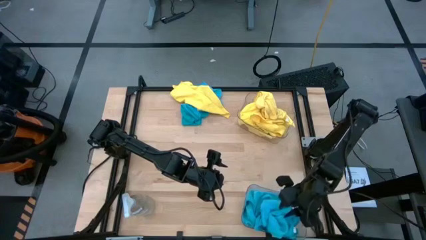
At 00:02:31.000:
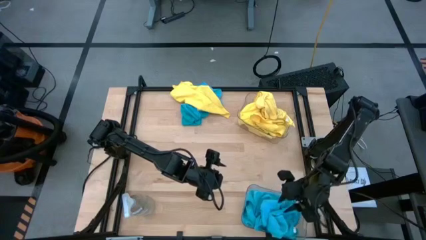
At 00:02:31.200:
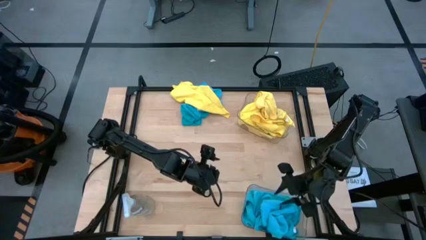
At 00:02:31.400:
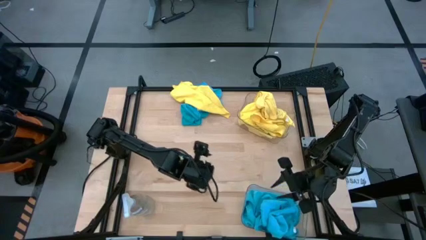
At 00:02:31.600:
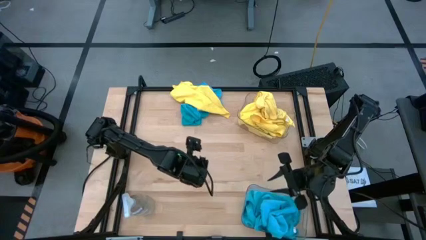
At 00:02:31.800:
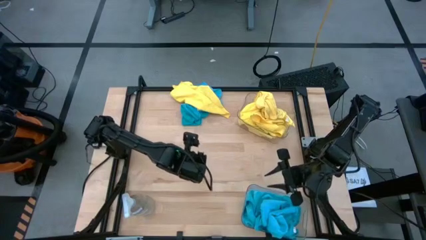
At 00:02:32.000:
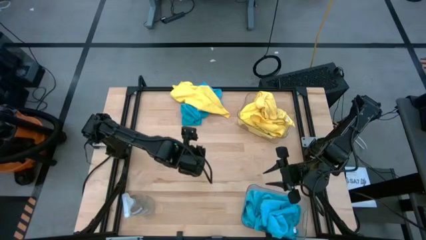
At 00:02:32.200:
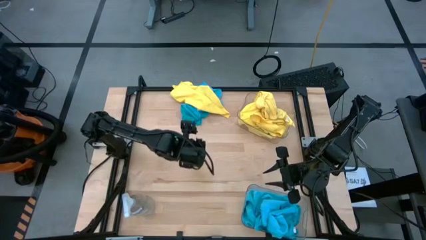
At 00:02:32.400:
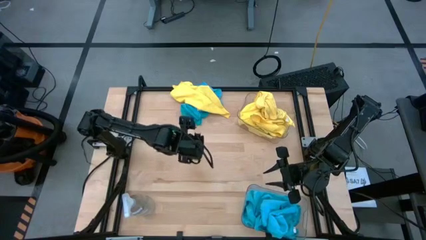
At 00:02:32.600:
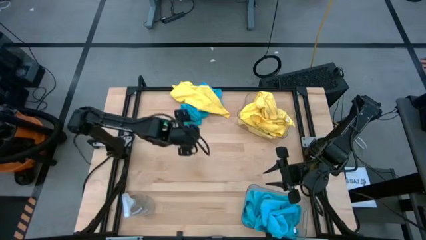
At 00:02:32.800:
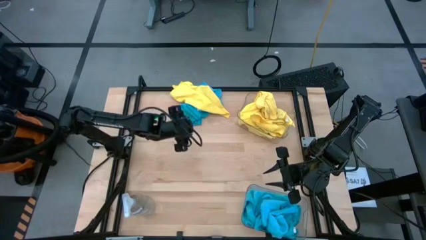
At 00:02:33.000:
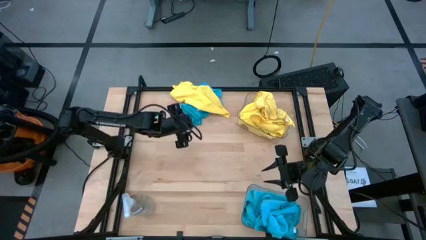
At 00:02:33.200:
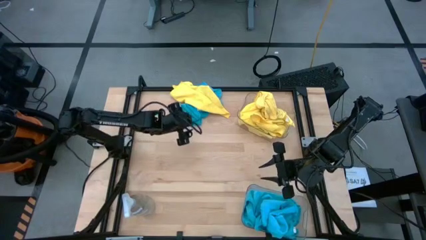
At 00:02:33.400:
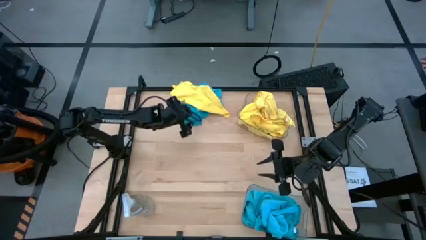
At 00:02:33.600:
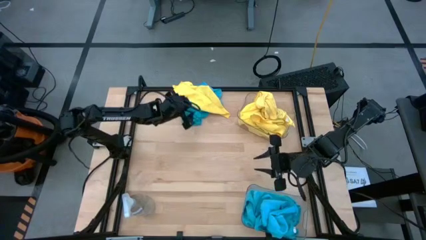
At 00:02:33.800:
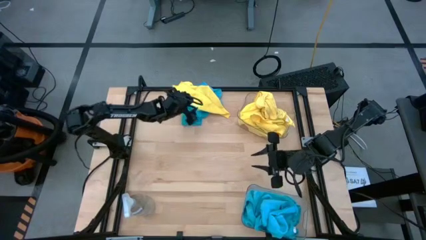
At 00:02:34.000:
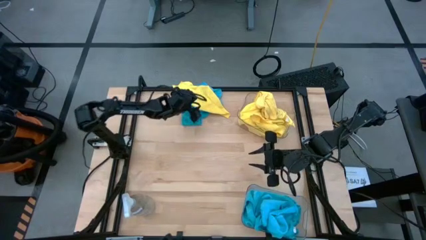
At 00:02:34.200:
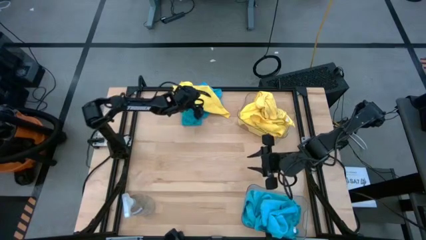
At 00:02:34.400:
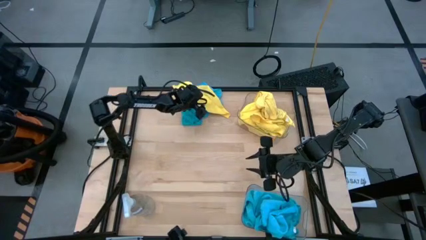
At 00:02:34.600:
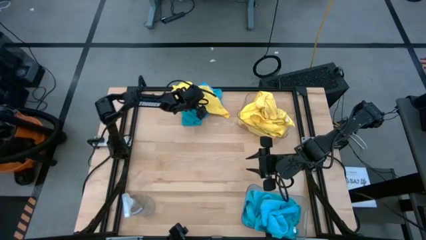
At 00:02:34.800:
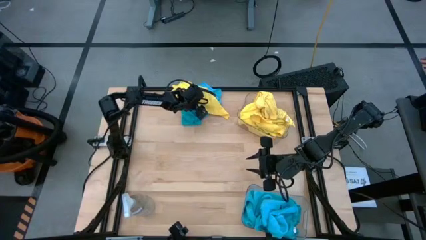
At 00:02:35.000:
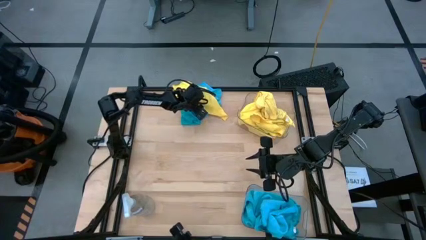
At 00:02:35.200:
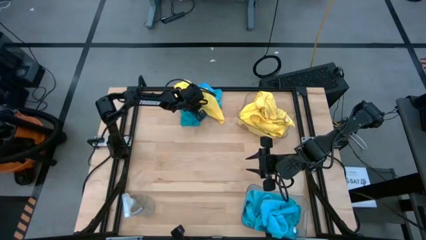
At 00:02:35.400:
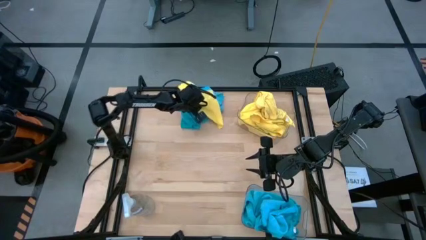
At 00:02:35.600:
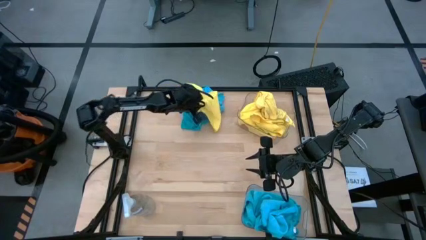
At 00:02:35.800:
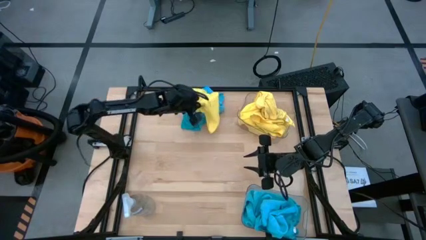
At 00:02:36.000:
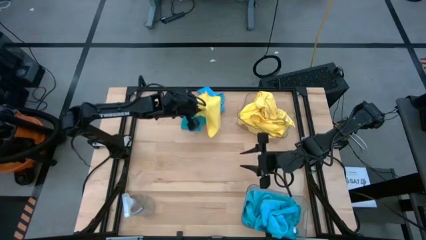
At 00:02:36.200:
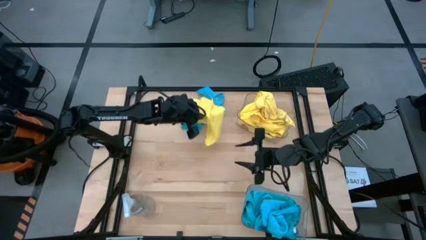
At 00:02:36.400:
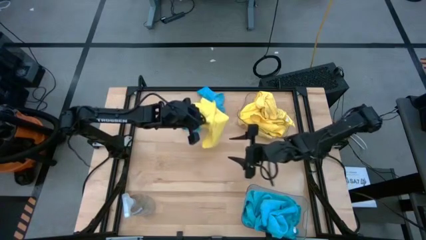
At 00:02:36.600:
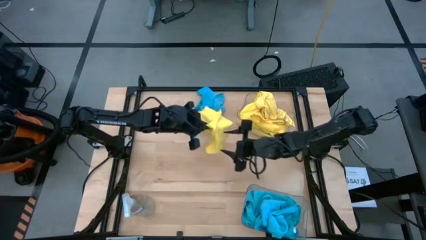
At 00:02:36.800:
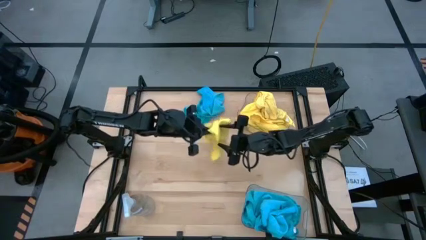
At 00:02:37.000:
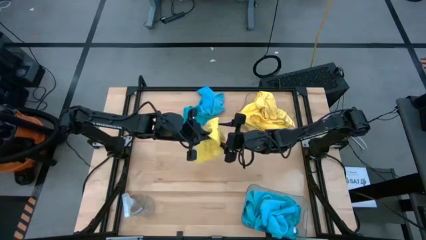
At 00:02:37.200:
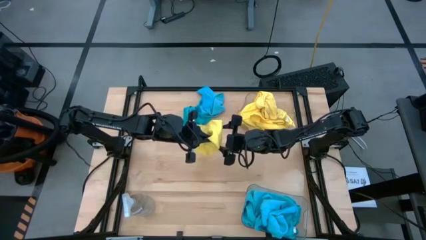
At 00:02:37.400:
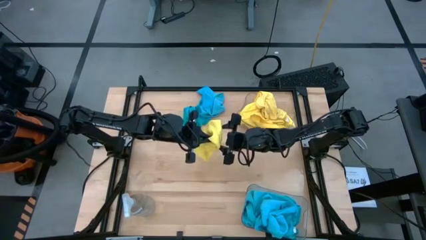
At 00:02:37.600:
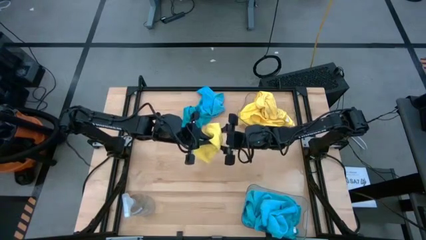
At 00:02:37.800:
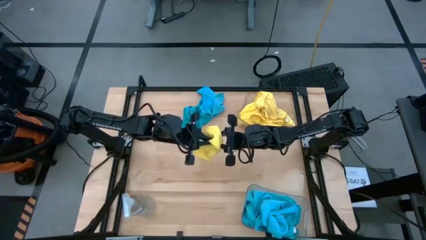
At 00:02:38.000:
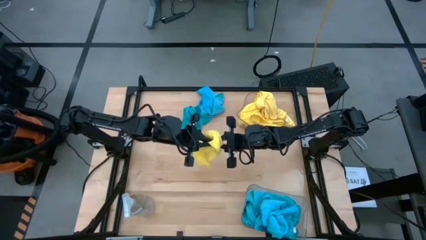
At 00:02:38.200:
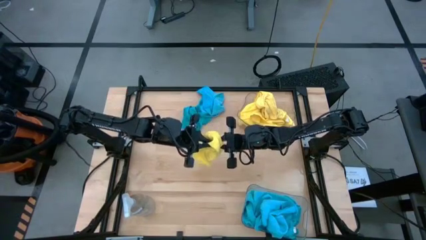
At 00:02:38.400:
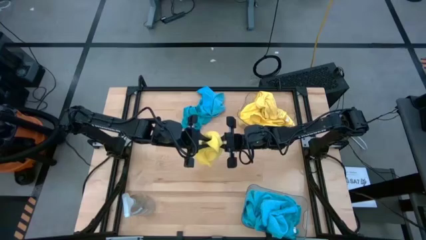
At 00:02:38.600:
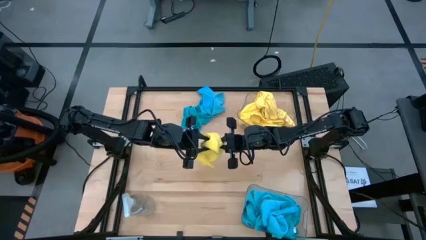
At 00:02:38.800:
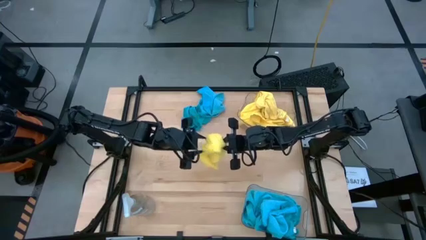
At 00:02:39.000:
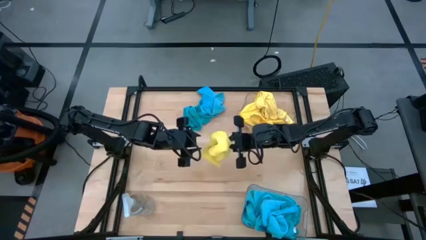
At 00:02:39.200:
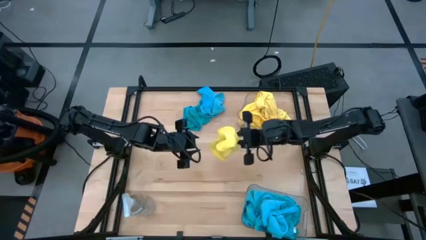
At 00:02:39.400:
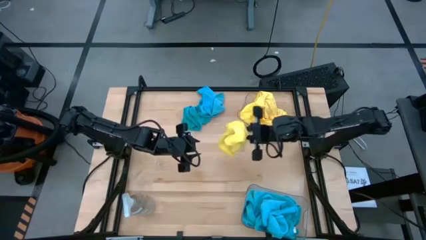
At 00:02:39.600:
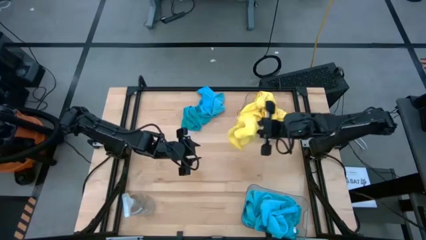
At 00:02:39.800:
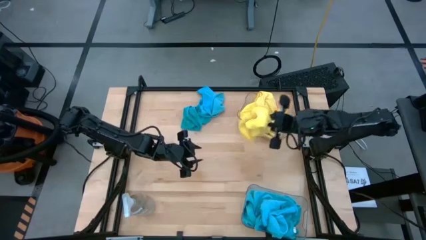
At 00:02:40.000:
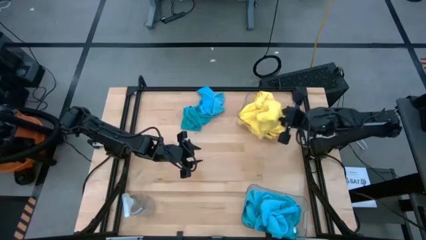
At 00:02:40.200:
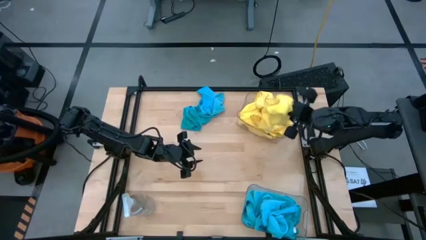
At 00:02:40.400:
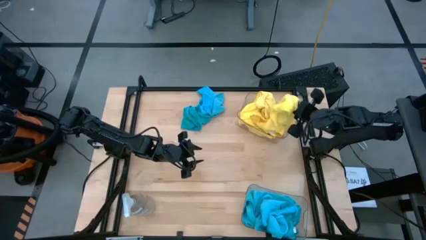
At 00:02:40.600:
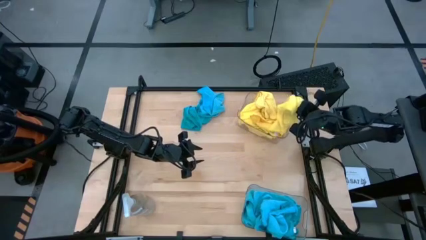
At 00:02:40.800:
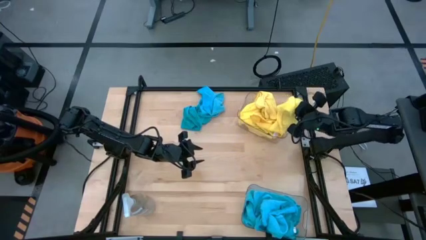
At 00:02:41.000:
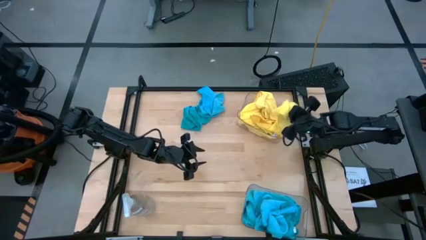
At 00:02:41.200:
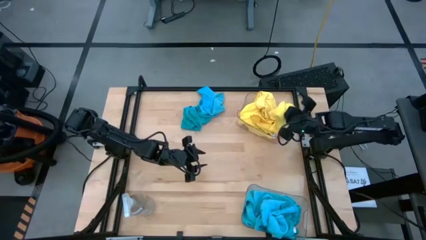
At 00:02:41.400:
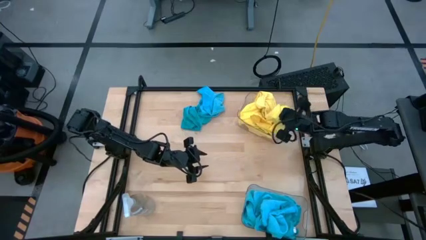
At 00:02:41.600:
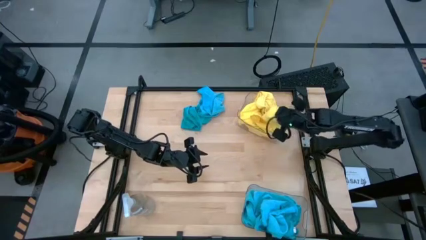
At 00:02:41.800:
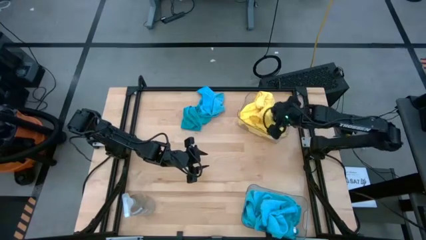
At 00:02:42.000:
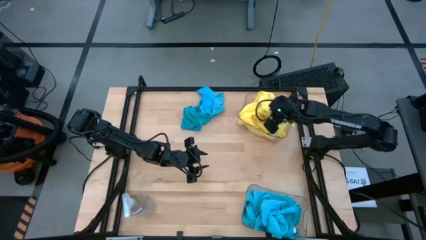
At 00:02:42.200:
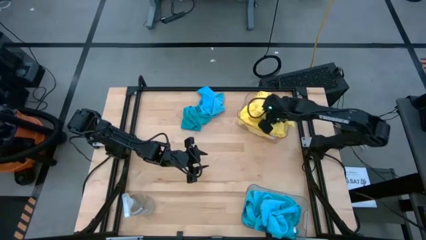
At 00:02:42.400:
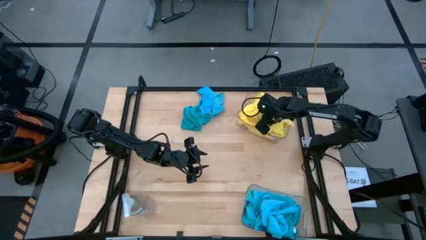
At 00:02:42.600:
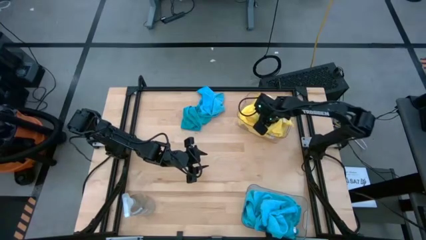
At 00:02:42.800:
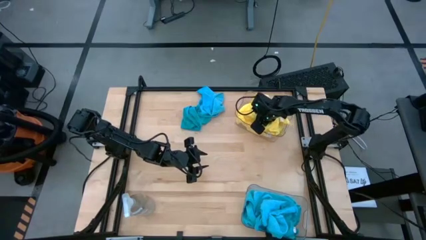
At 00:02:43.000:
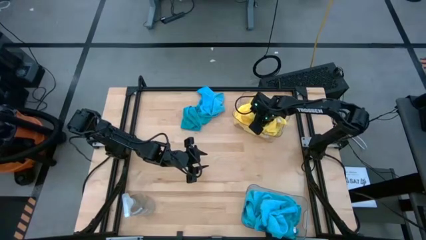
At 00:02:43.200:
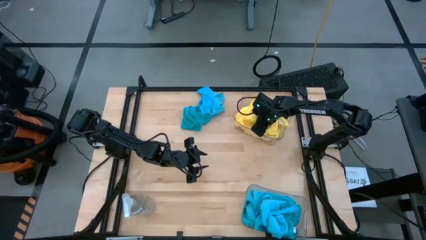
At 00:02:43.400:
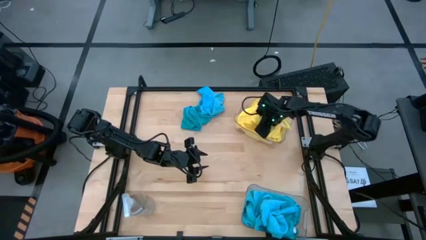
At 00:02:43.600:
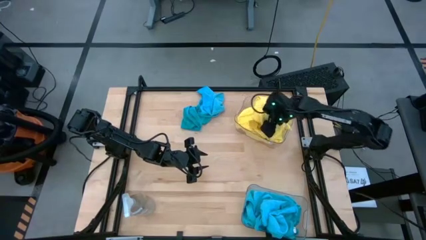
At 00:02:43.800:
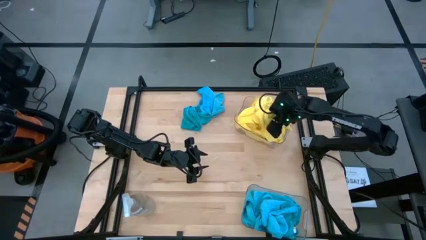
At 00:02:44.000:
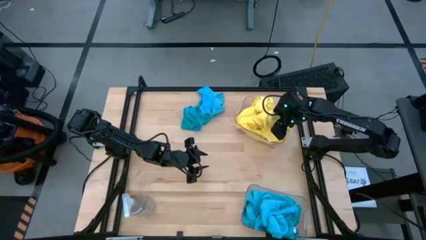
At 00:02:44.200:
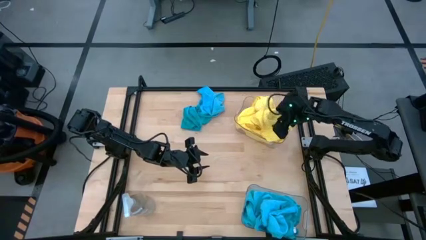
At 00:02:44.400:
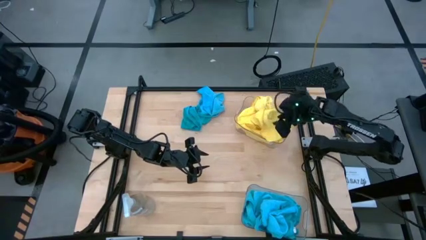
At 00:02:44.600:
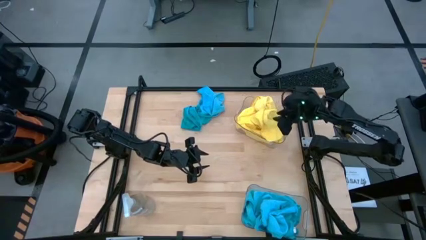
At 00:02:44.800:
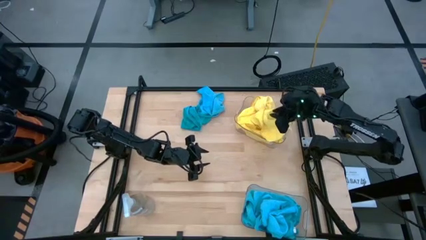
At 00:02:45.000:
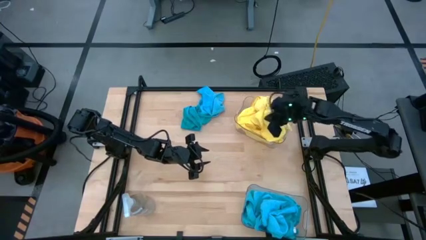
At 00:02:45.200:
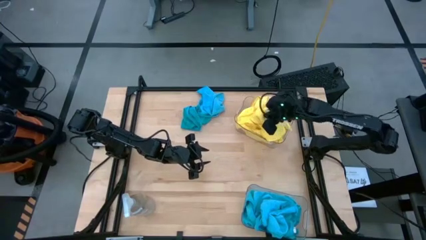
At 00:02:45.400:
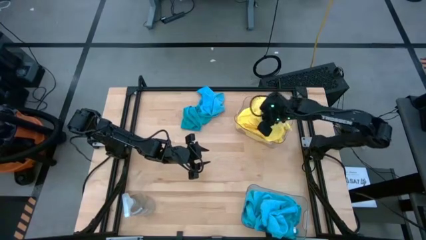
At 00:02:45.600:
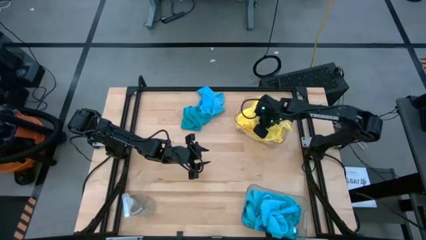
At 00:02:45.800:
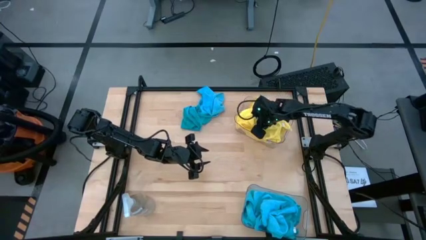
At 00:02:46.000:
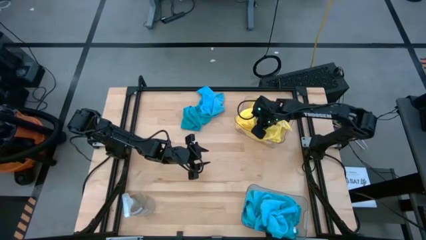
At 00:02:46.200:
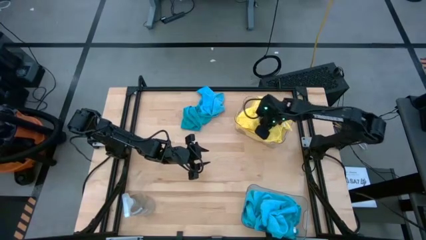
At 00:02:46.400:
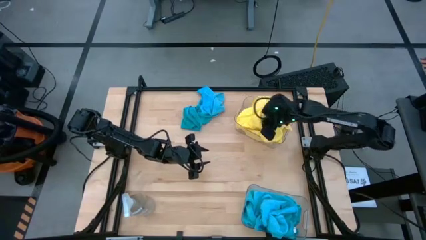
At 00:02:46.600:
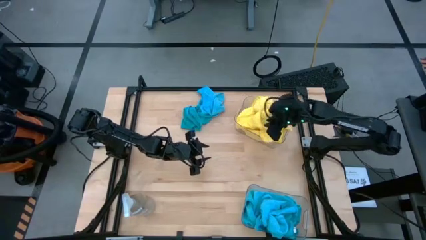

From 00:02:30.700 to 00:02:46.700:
Task: Sort microfiber towel by color & place in baskets
Put the yellow microfiber cloth into the top transparent bin
